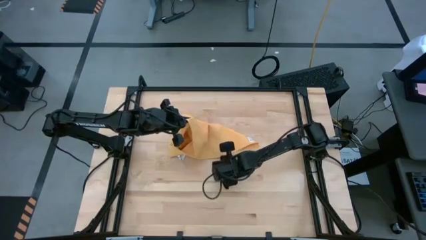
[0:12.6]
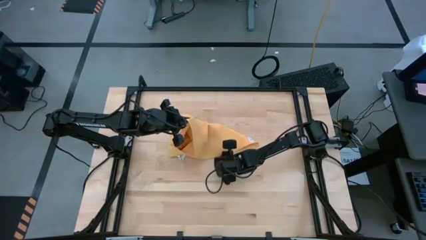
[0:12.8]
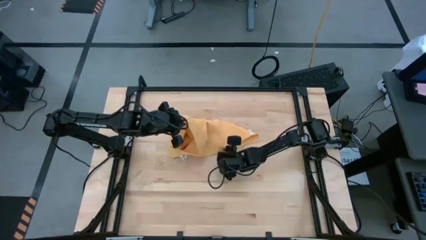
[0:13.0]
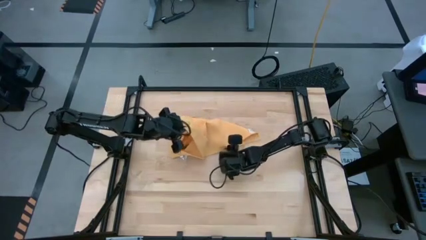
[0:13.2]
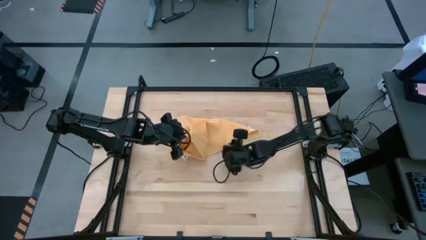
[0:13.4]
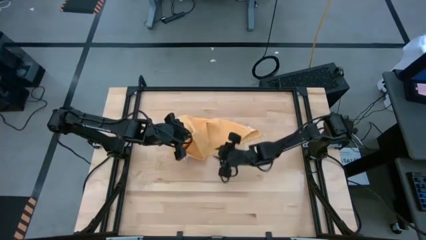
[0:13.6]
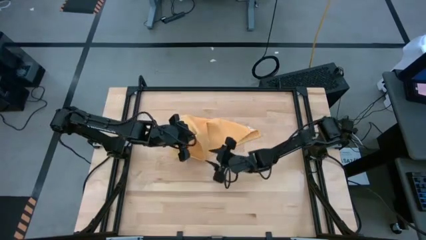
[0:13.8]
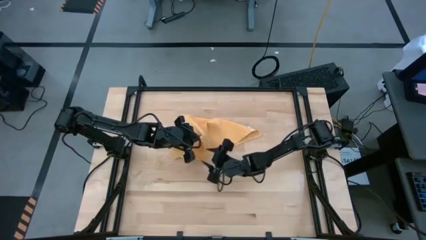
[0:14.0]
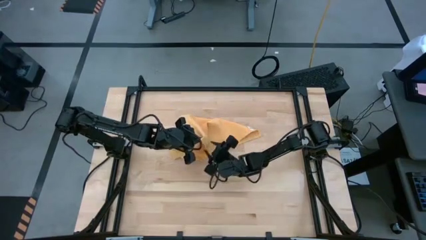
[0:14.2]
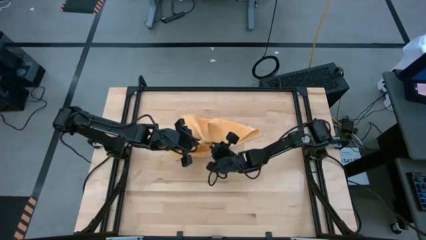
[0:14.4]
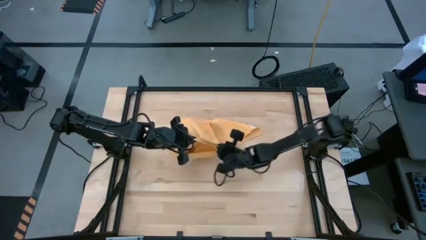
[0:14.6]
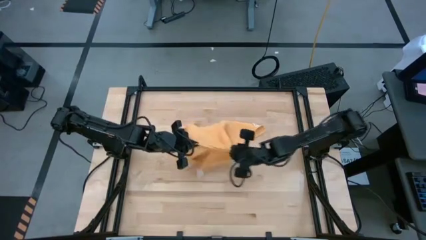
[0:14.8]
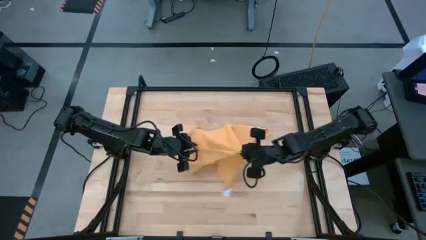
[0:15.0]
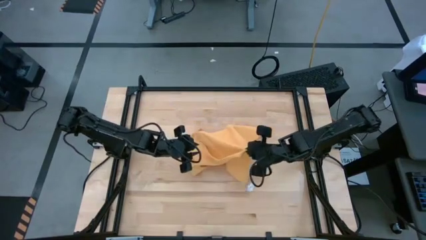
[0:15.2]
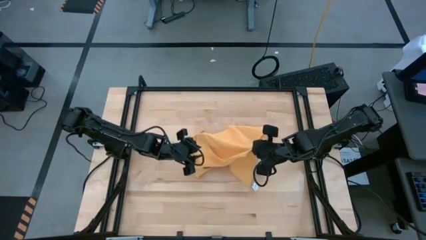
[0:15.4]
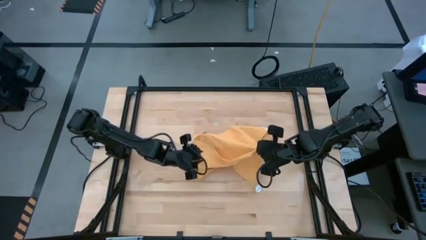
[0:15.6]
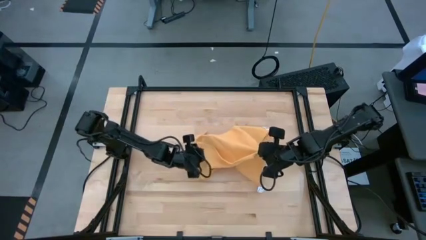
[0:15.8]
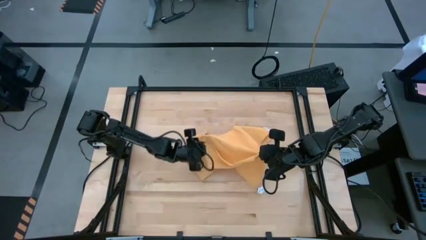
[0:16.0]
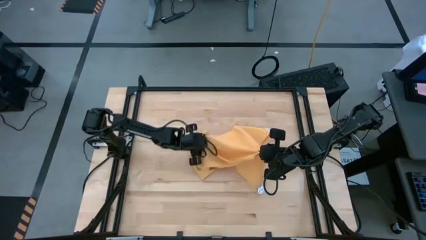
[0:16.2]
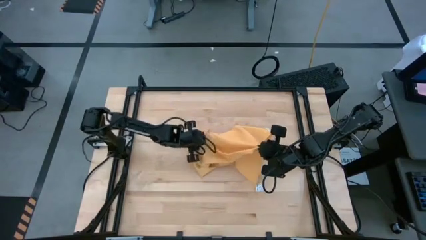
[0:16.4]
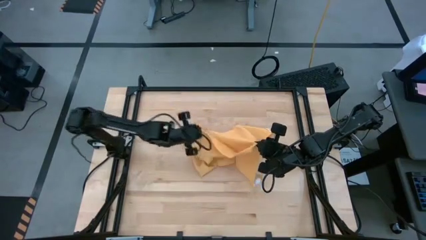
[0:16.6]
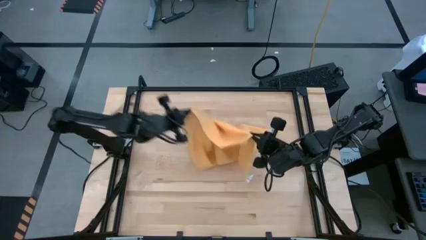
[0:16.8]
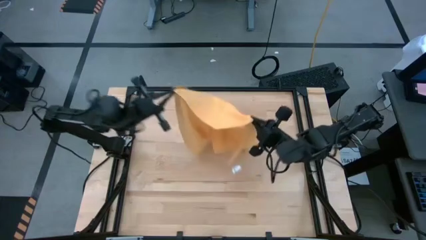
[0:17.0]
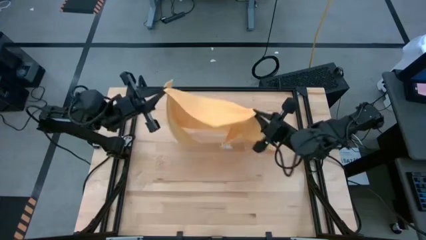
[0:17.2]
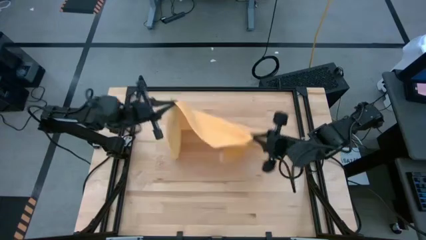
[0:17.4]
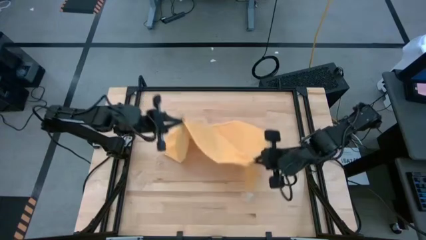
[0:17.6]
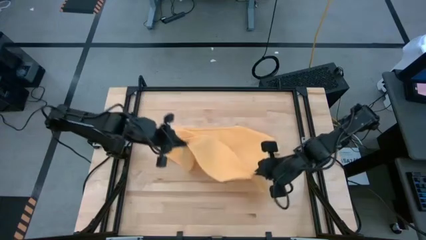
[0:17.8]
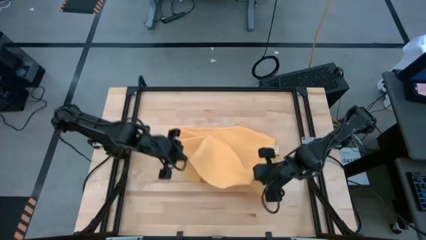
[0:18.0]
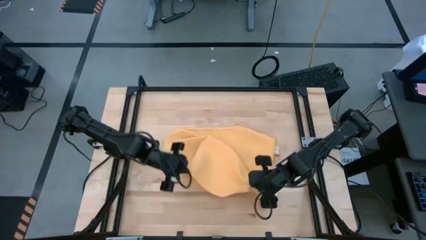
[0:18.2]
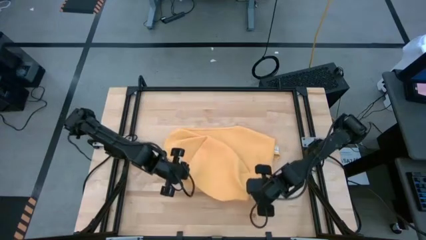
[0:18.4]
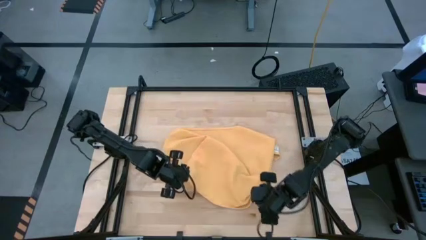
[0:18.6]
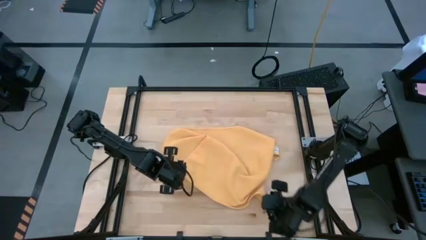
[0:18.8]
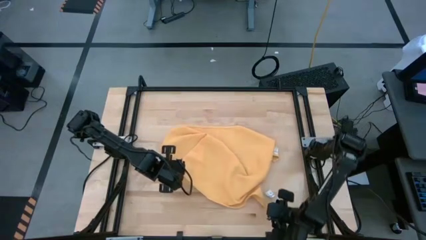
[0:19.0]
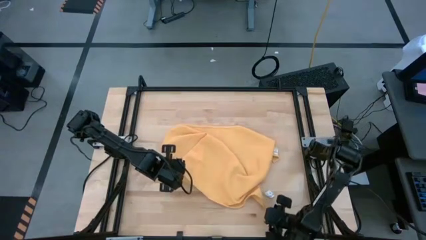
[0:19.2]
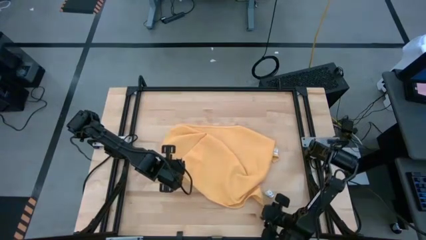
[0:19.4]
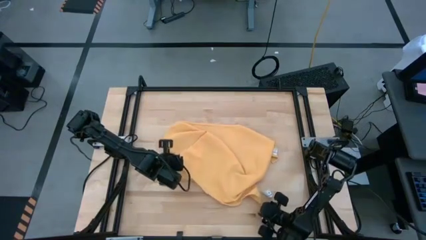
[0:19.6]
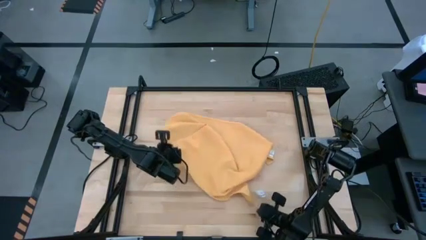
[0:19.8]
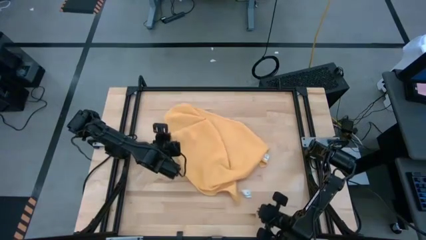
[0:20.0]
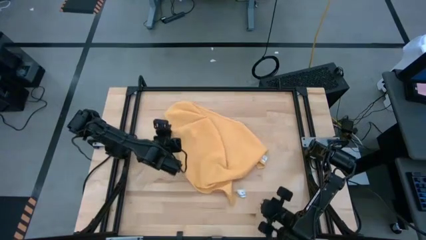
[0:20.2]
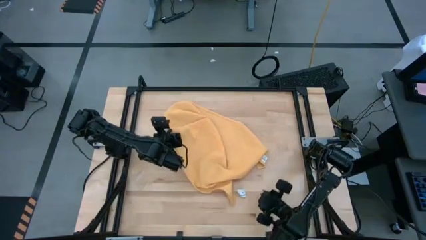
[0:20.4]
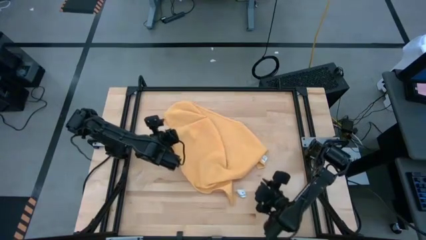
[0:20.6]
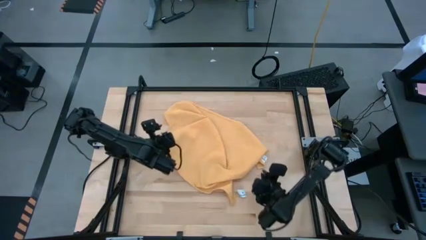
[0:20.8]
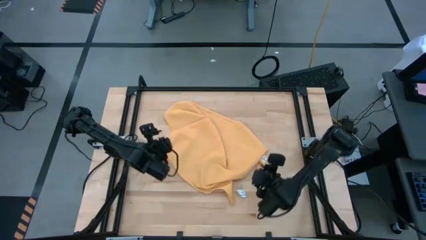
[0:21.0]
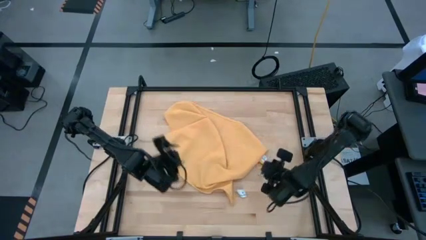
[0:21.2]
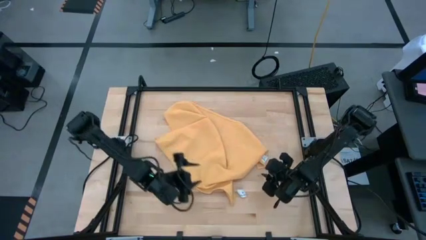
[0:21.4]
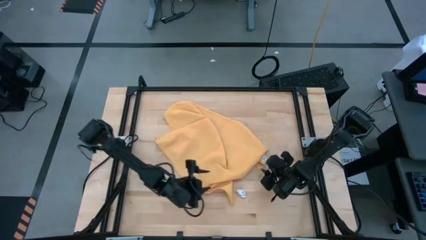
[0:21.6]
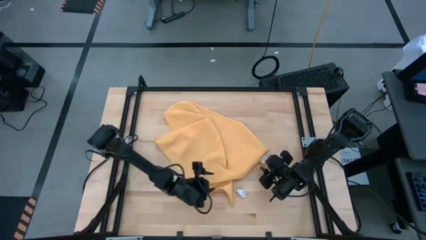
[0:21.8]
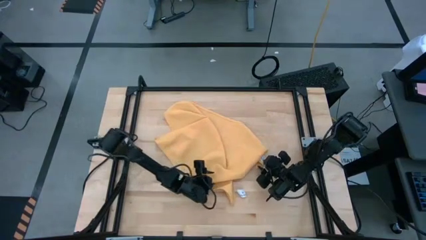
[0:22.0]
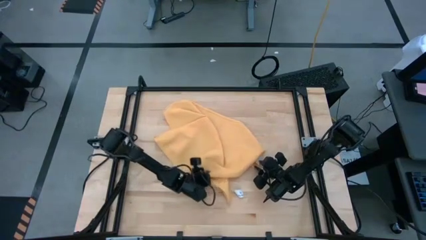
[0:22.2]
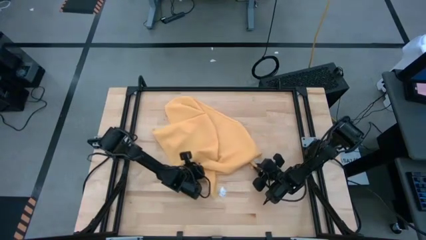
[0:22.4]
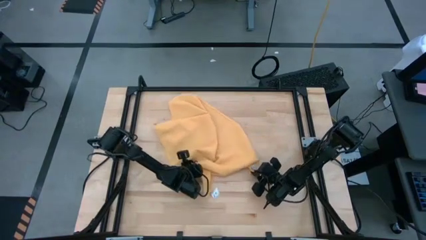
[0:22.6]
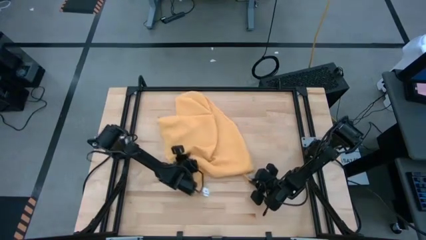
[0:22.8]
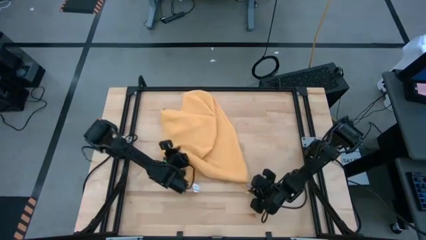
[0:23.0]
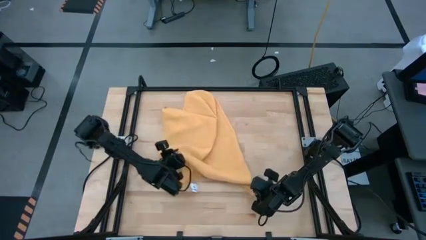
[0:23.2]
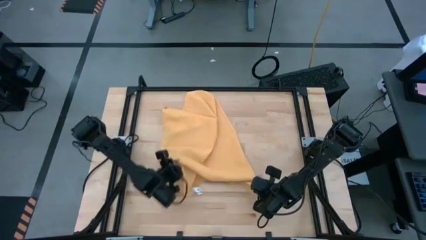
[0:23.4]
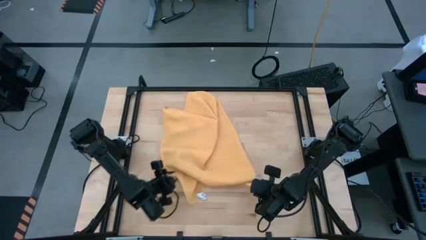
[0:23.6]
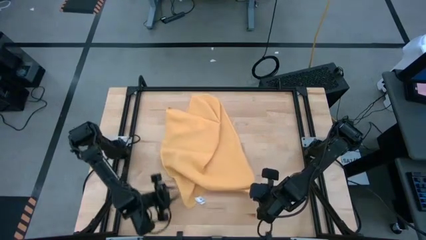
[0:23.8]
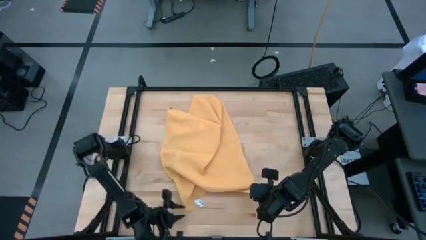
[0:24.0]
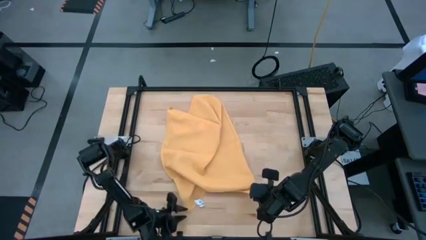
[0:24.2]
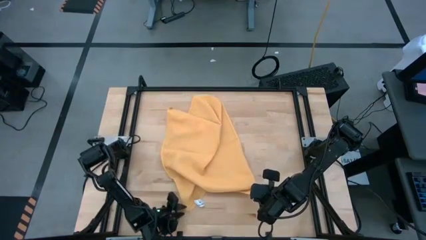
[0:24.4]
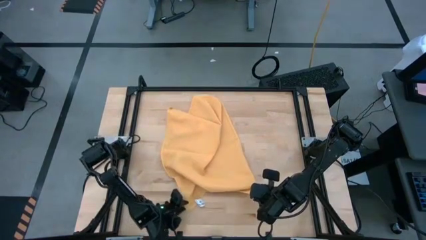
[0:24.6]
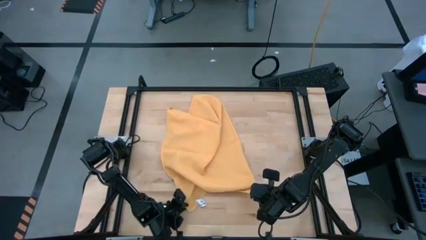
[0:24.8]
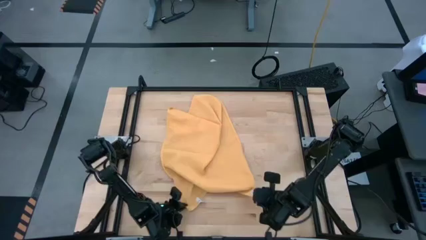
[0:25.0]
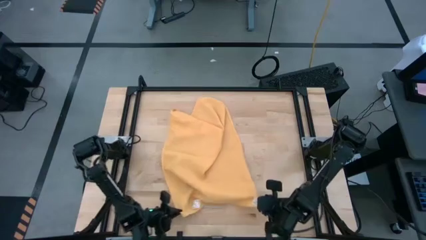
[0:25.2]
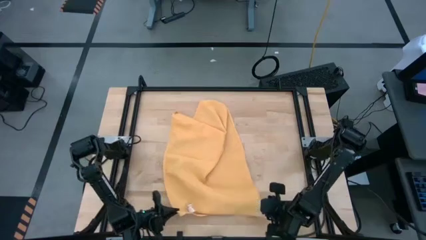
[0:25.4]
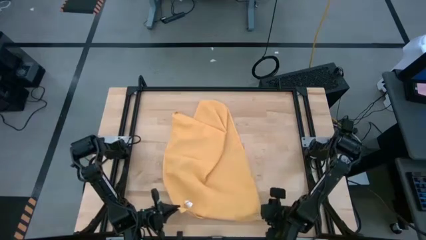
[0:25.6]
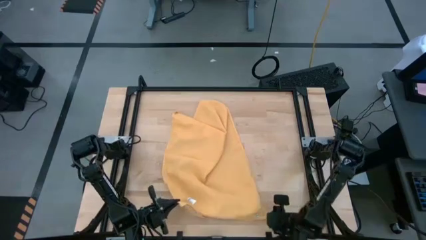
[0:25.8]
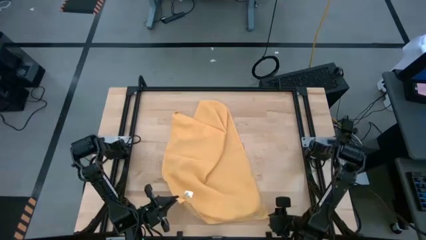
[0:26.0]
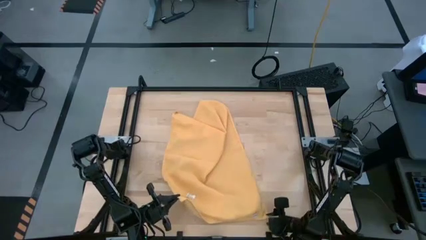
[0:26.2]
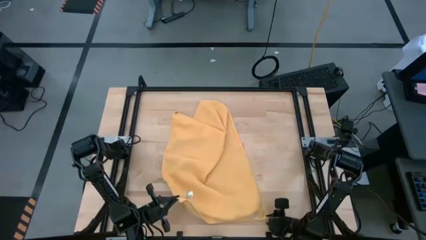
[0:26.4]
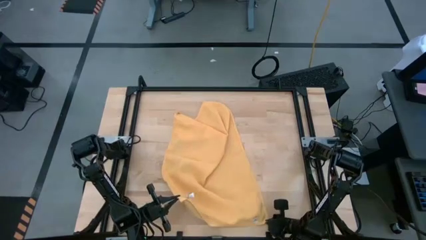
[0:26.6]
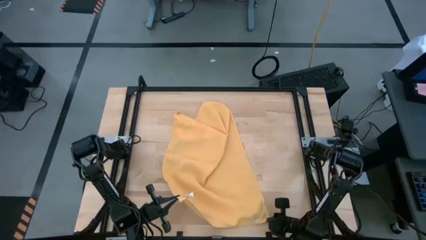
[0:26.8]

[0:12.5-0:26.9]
Task: Roll towel
Fold the yellow towel
